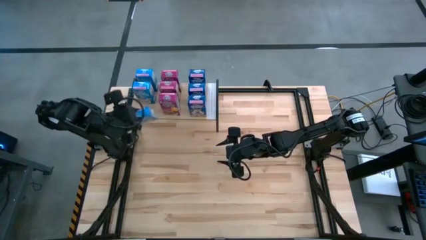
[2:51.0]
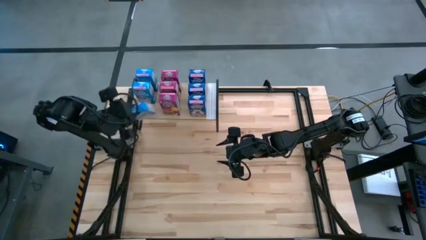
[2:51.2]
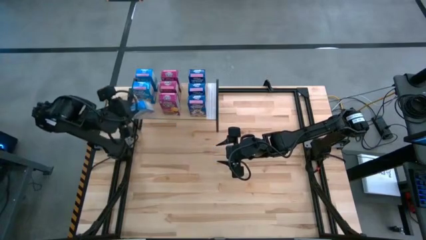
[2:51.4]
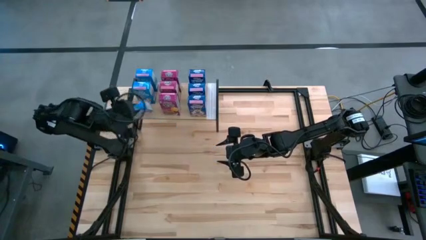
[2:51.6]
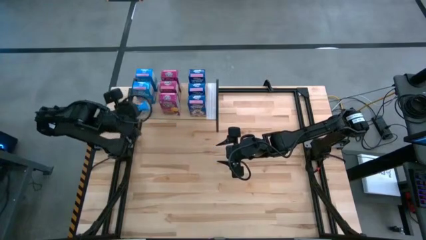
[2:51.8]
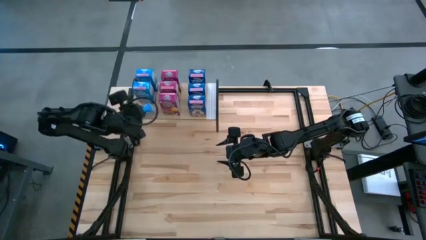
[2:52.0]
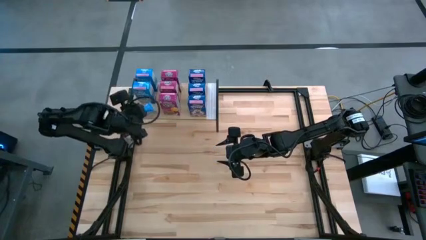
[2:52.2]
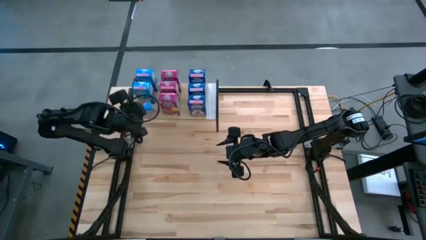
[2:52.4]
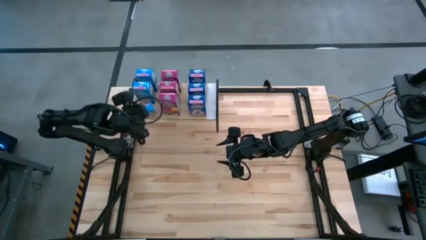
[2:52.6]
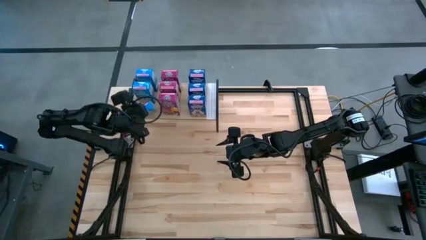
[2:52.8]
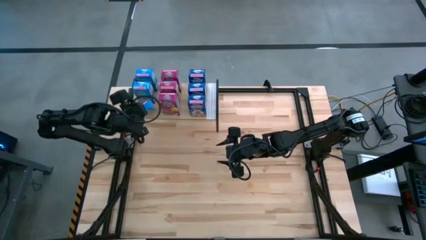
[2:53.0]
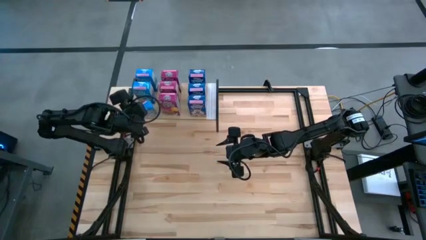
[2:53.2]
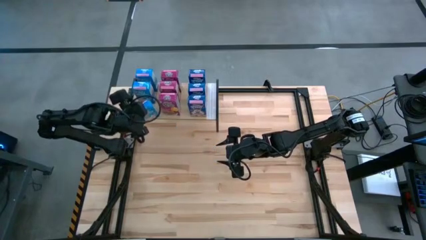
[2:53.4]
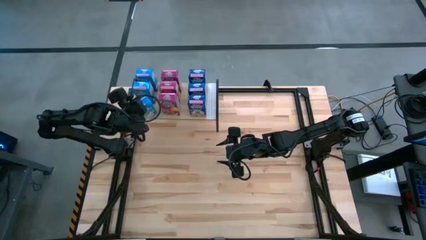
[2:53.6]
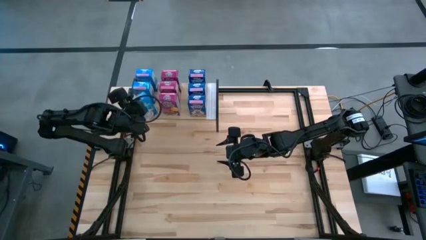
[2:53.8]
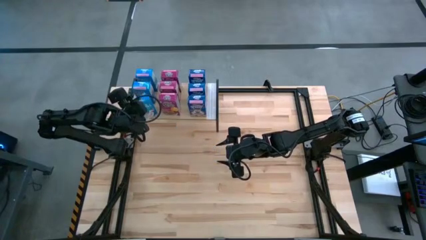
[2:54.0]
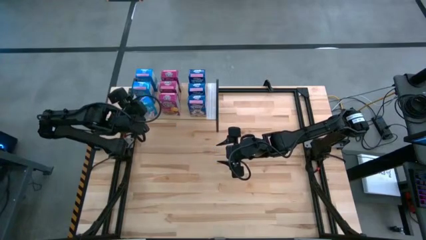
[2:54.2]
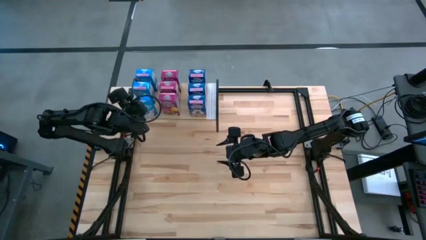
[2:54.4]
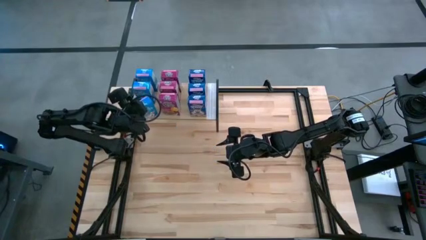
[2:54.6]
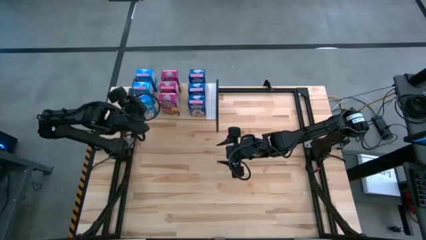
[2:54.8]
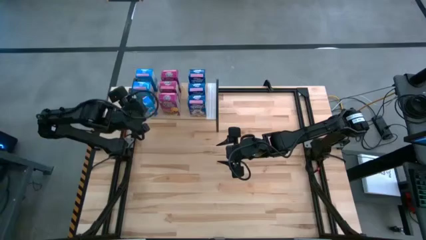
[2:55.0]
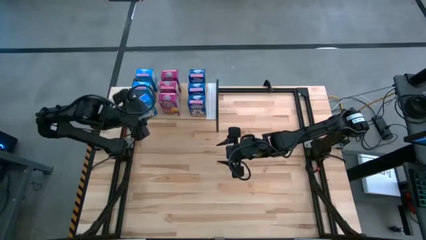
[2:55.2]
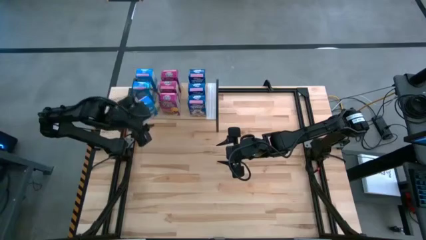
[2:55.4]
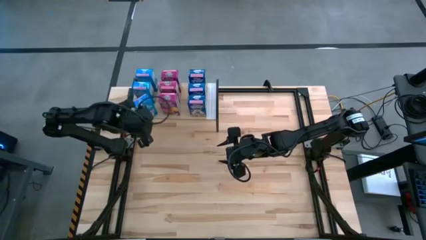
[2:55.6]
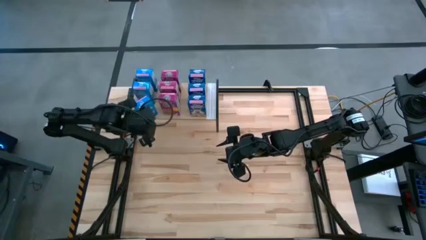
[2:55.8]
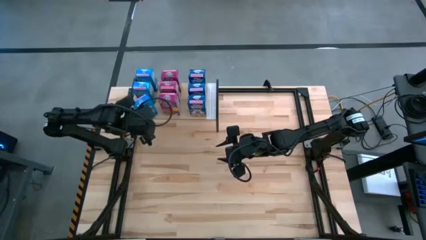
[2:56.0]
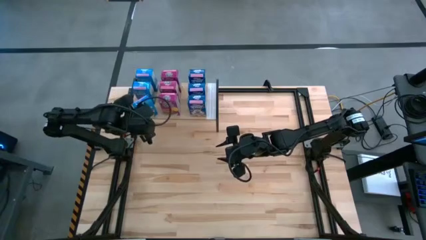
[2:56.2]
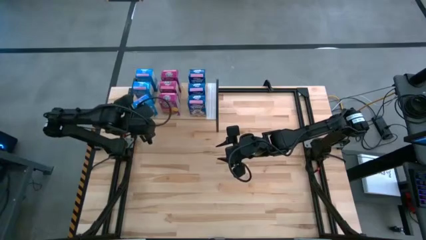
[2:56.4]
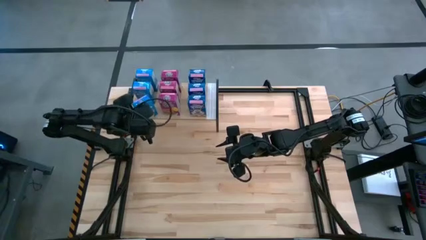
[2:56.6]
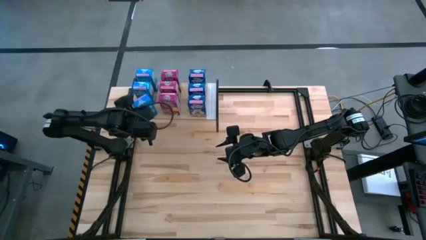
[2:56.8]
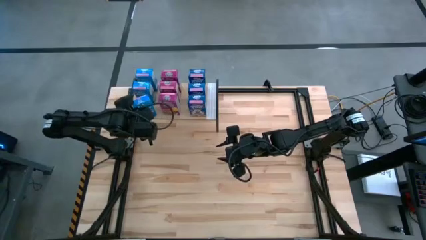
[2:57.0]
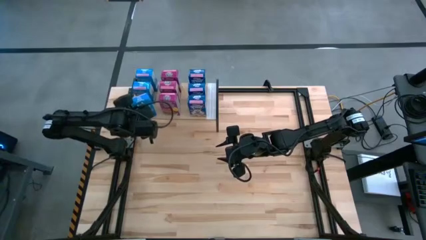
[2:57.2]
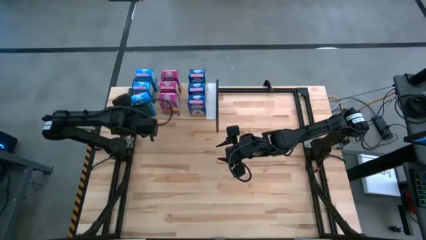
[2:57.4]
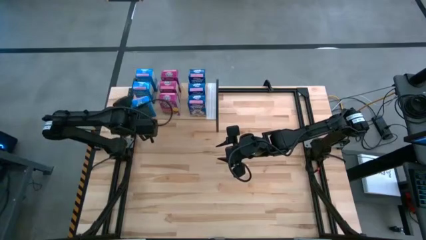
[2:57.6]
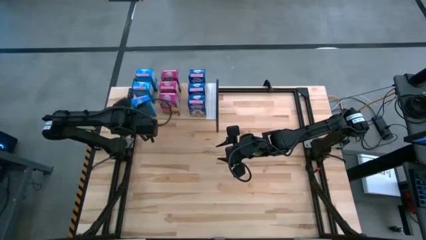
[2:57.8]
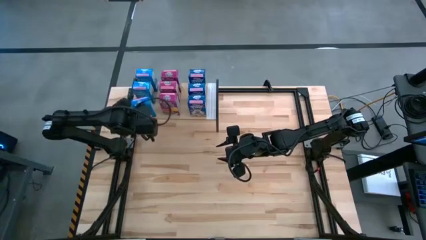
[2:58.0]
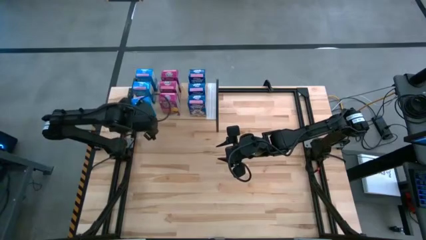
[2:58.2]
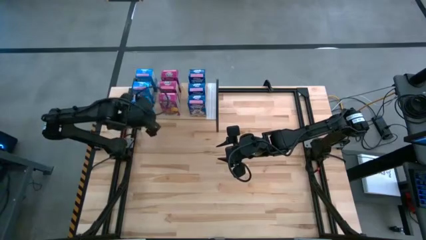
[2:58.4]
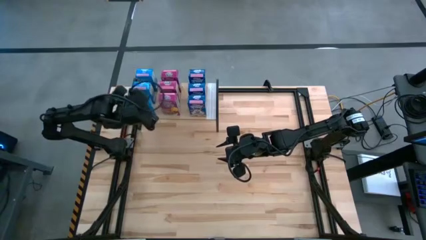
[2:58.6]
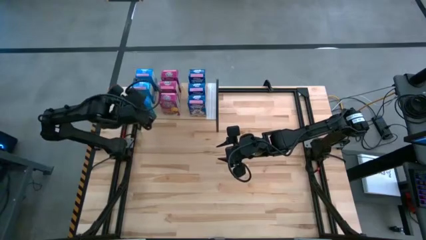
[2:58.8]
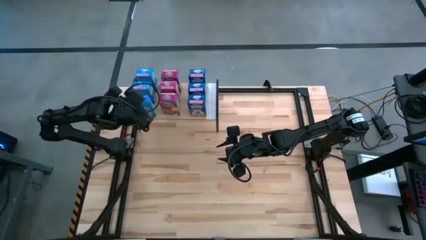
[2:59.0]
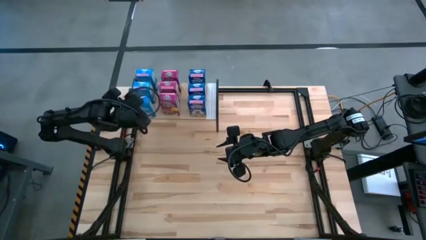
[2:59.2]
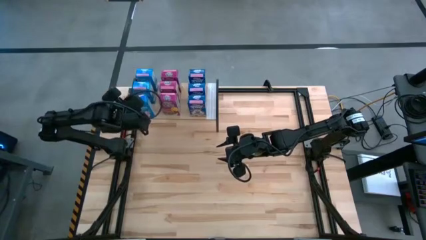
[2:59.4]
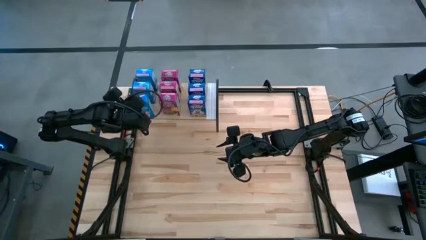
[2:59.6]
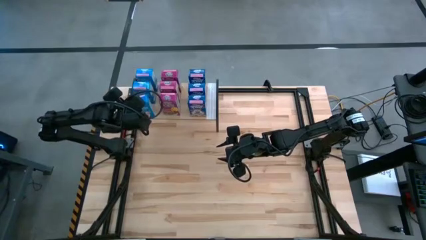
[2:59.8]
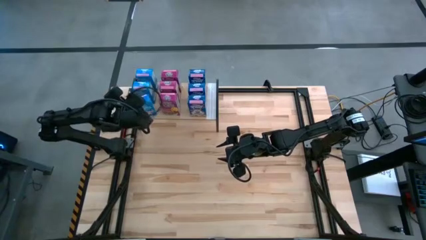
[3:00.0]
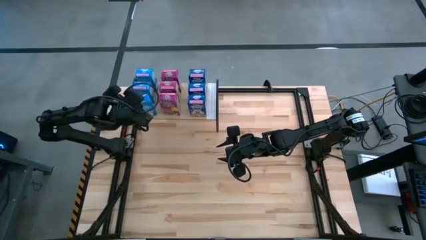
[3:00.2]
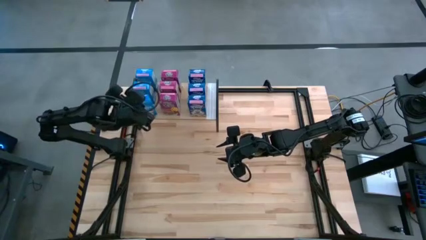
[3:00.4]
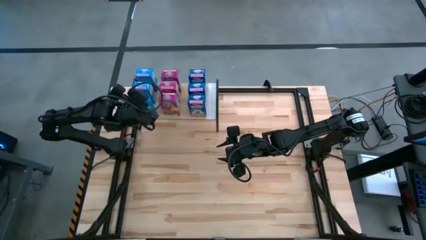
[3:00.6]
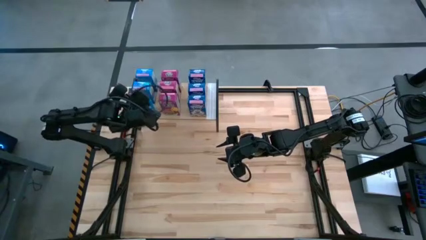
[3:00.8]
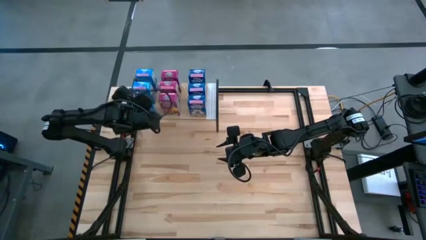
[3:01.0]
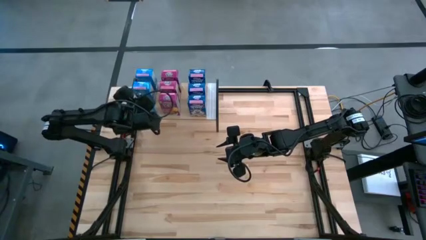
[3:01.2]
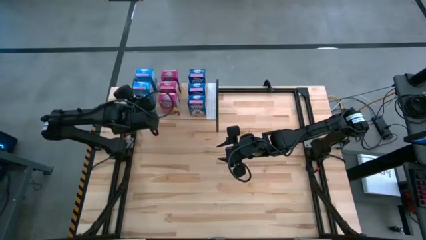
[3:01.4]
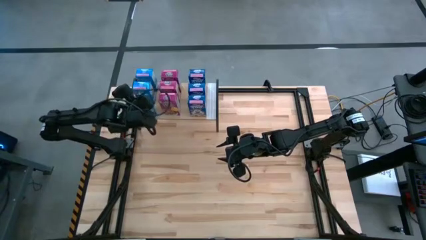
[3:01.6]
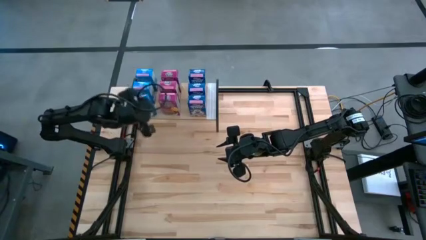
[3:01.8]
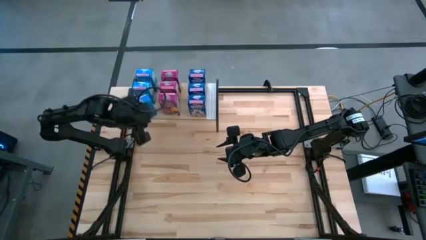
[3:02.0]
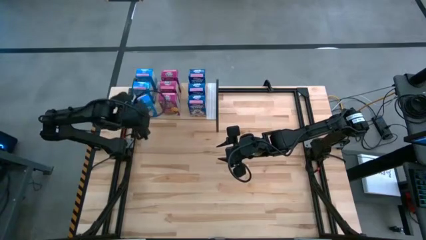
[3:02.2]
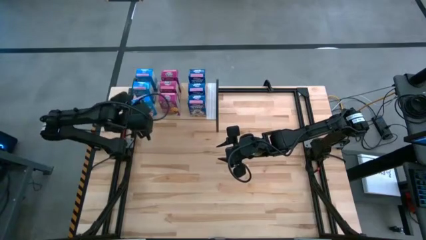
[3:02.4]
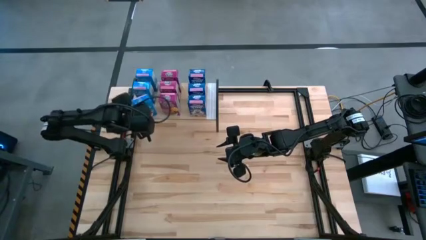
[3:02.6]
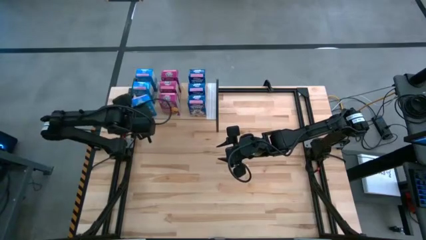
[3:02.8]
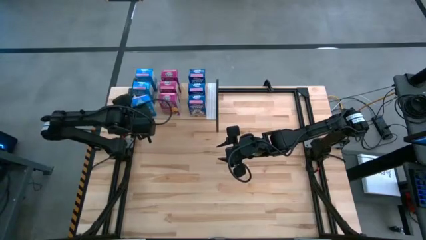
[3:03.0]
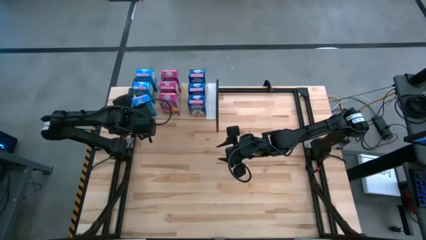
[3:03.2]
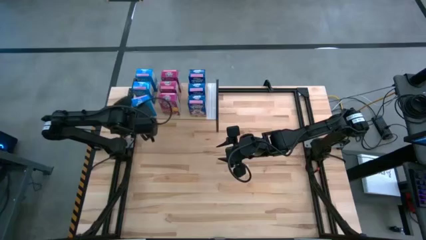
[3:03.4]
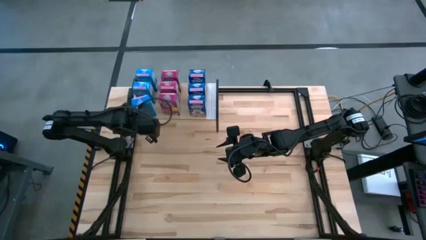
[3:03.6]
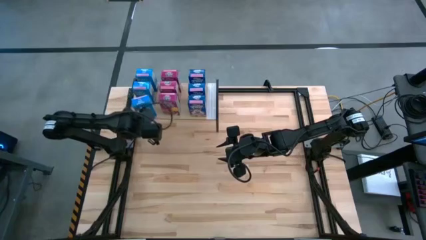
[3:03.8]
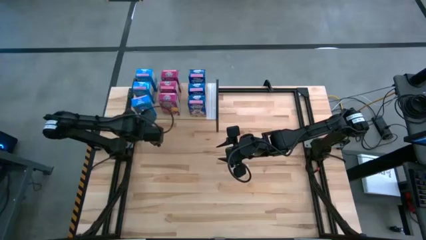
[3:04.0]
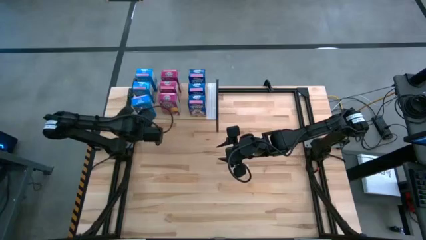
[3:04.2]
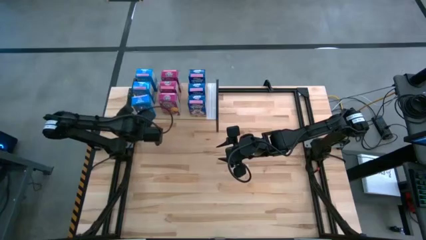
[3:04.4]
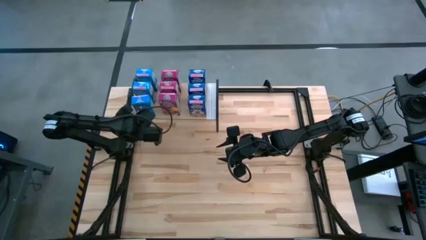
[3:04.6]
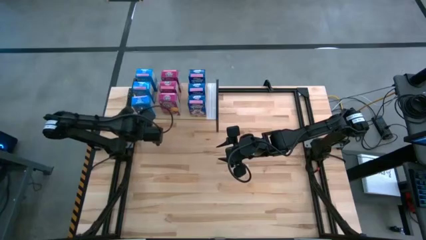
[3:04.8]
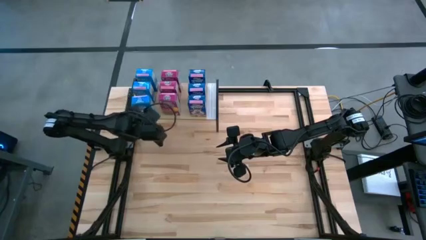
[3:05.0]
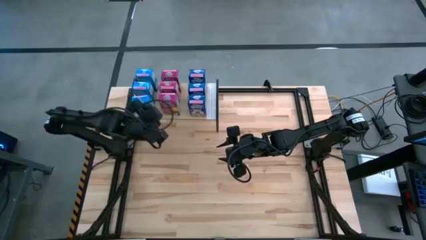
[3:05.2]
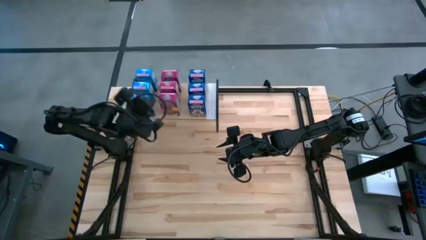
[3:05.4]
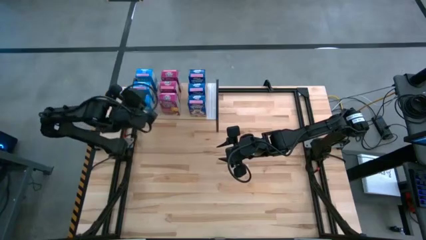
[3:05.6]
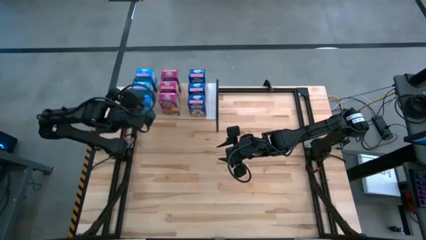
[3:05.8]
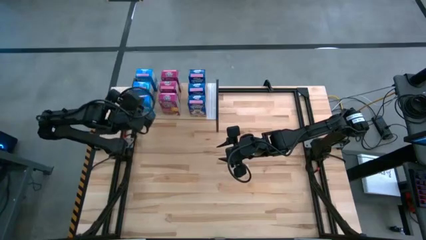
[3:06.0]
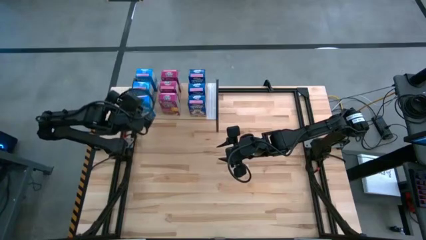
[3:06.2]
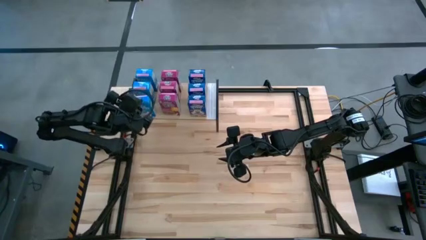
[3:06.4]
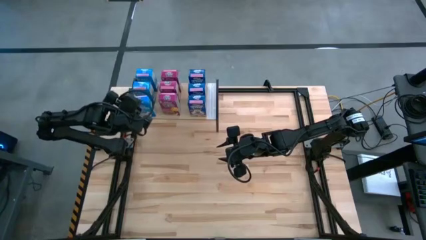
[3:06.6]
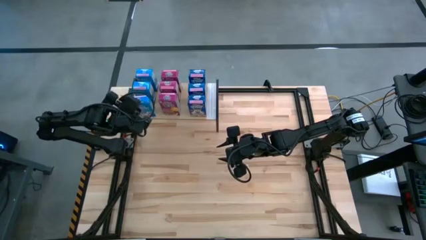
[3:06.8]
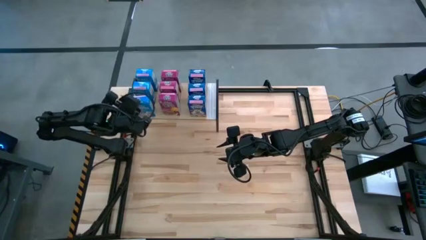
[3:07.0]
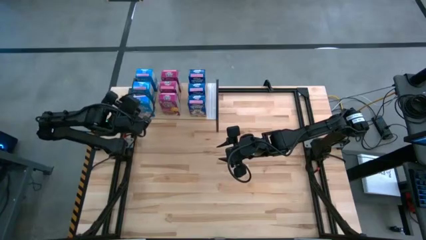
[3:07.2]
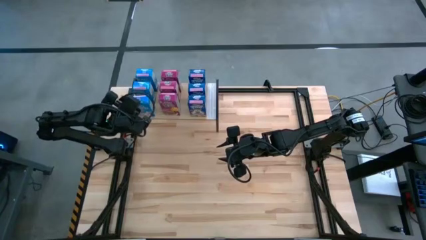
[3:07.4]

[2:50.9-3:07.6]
Task: Stack cereal on shelf
Put the light blue cereal box on the shelf

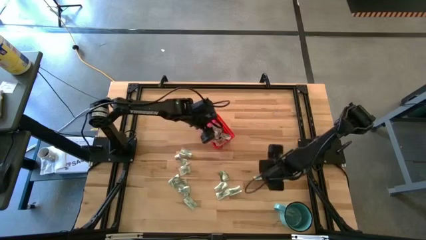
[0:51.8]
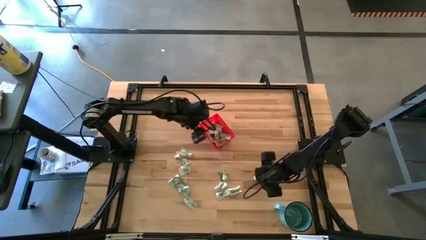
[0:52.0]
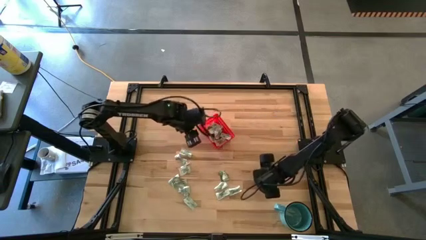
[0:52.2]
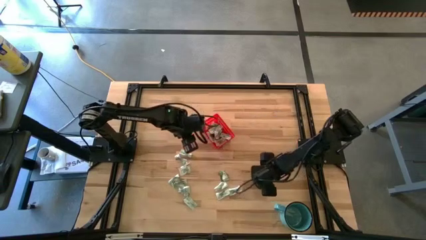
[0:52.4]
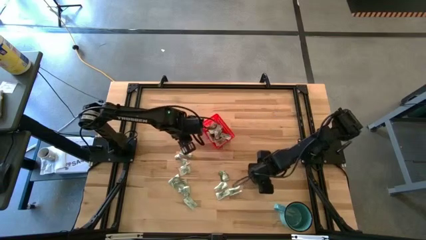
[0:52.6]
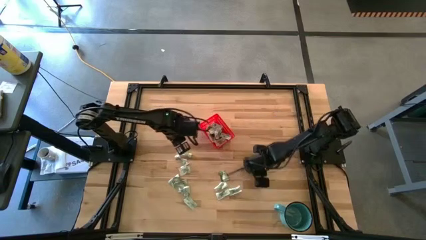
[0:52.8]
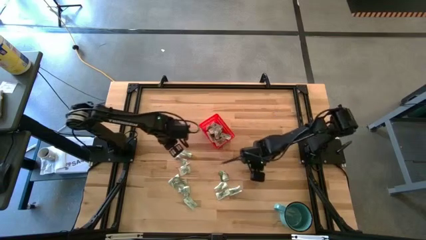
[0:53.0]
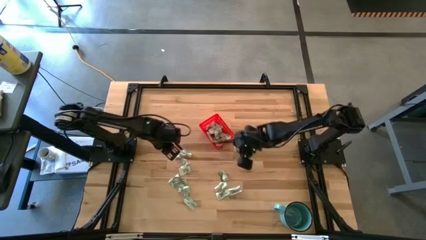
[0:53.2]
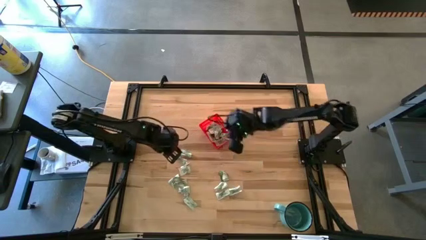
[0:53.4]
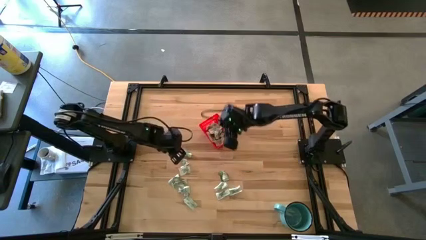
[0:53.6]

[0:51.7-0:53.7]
Task: Pick and place Stevia / Truvia into bins
Put the stevia packet into the red basket
